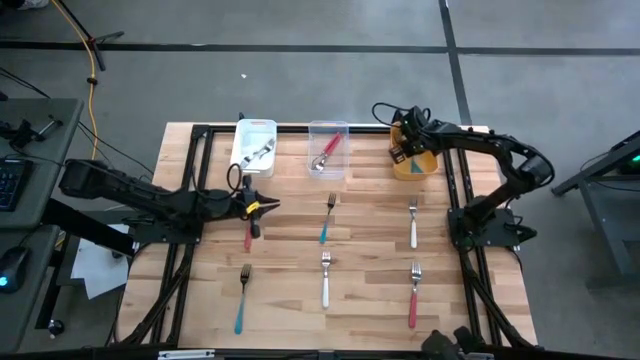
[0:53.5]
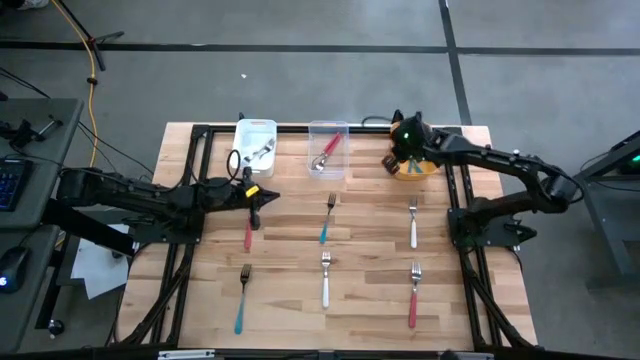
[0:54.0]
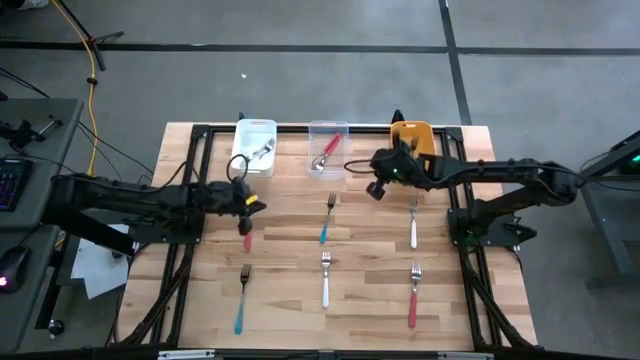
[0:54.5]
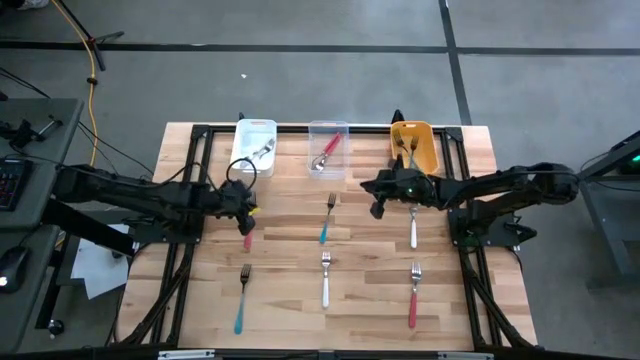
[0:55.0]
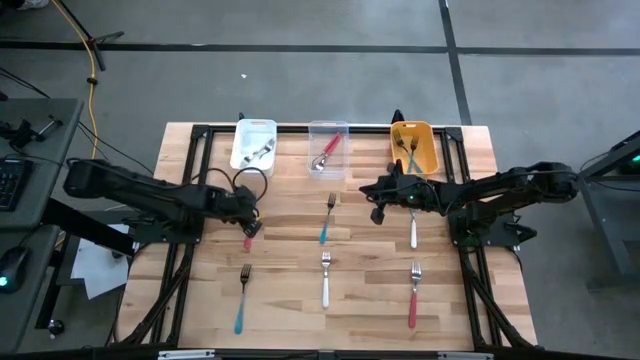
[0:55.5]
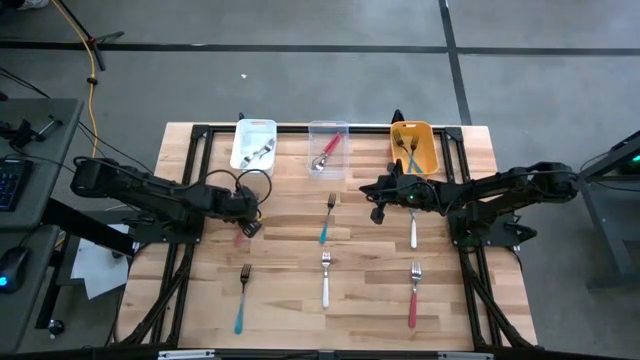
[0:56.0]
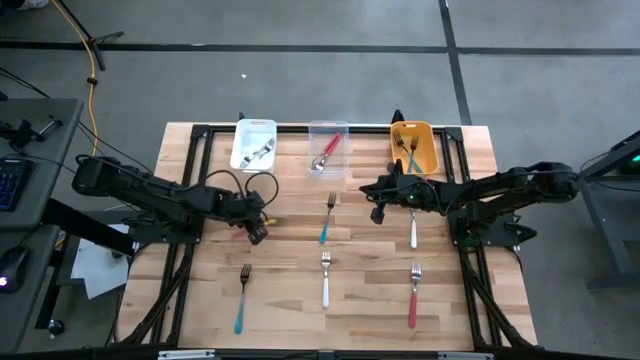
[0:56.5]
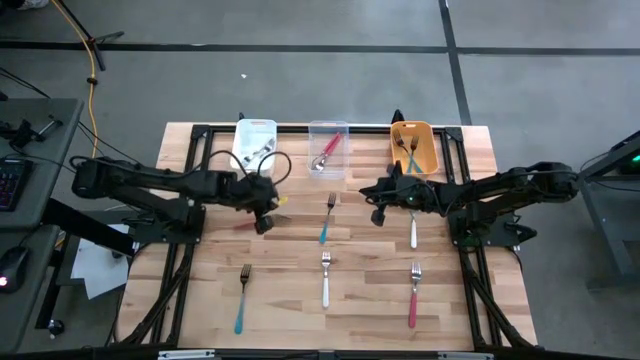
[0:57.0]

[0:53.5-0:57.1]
Task: Sort silverware by color (type)
Put the top pink fork into the transparent bin

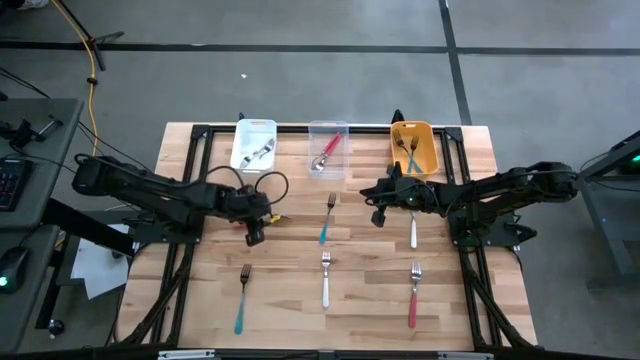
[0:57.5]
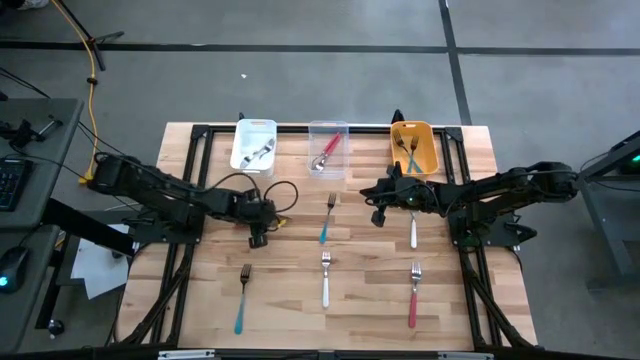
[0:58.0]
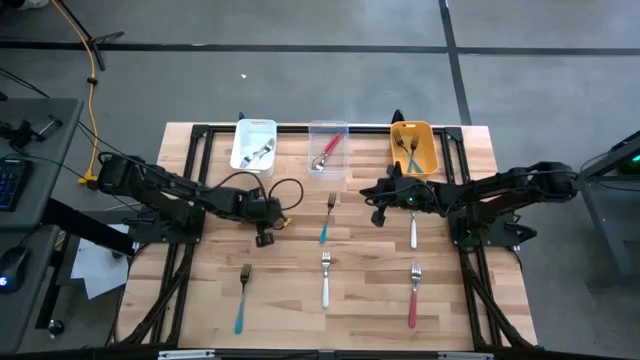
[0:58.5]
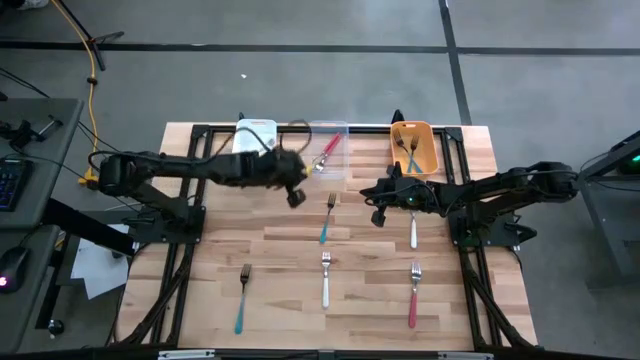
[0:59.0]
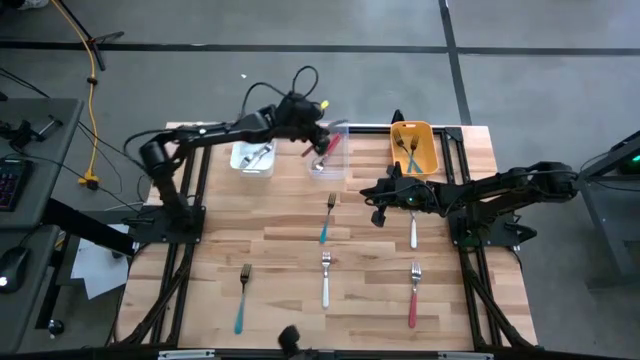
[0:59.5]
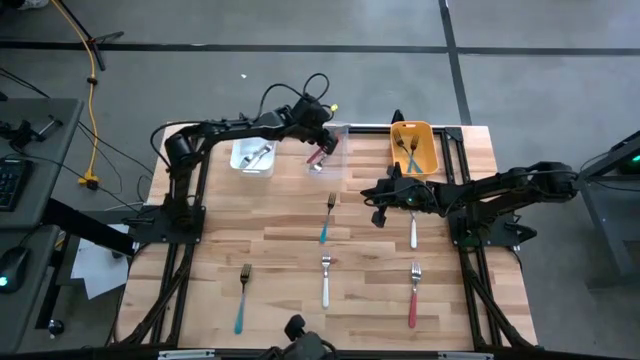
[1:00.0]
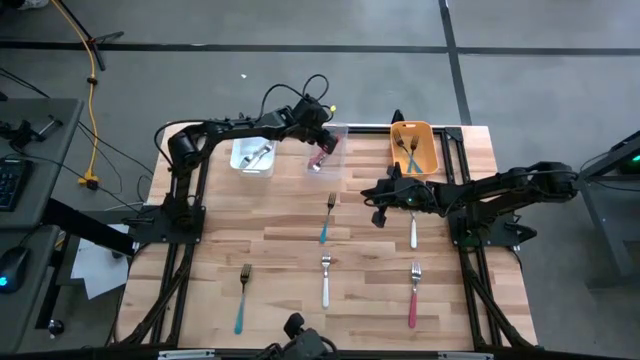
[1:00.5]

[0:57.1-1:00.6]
Put the top pink fork into the transparent bin

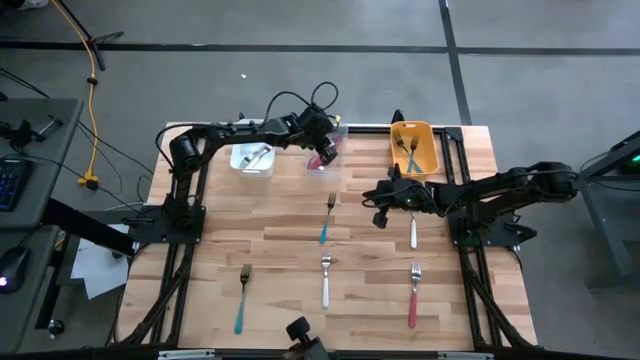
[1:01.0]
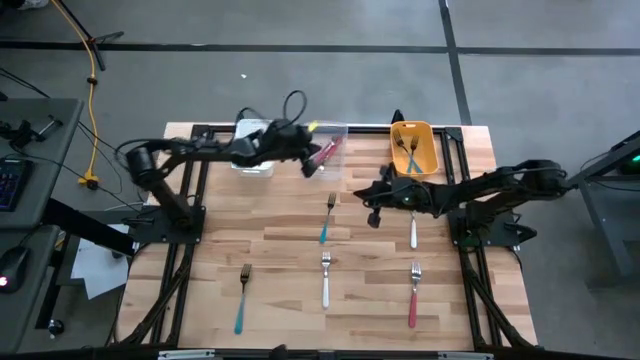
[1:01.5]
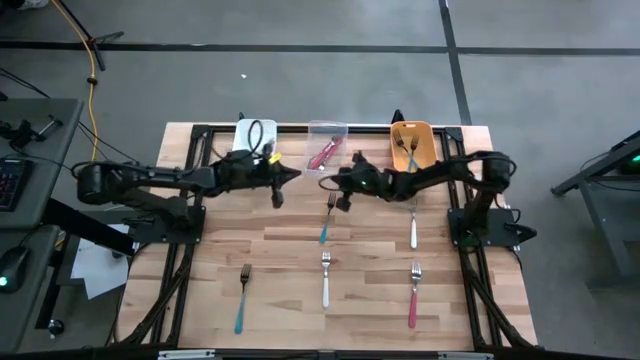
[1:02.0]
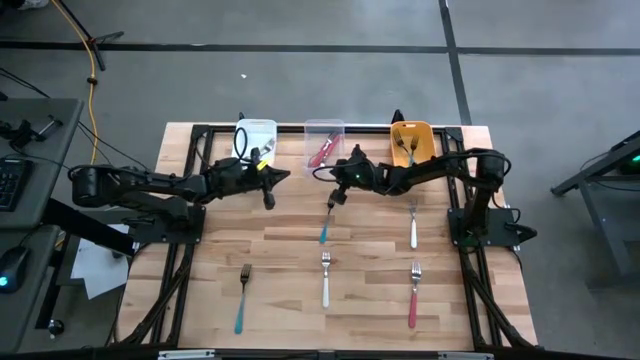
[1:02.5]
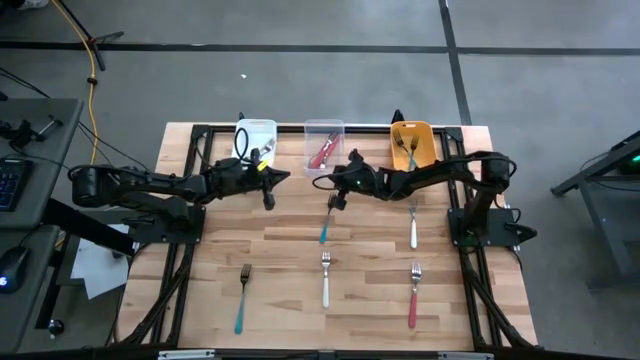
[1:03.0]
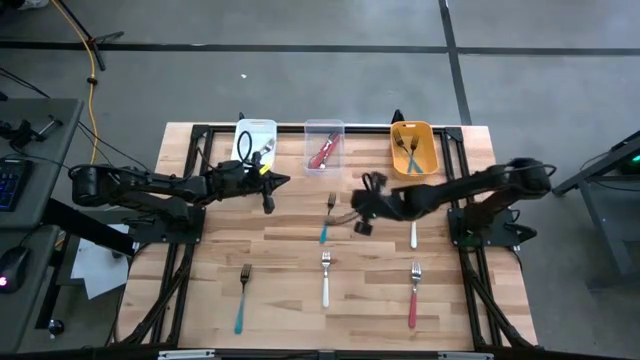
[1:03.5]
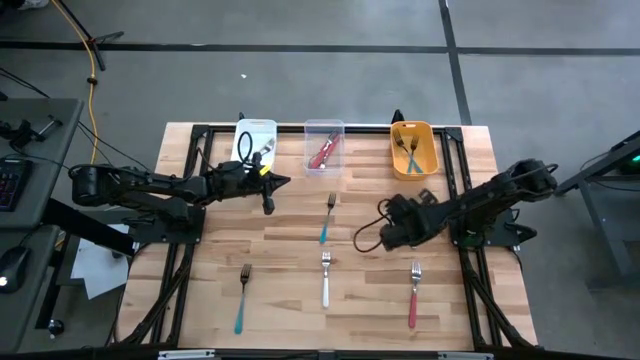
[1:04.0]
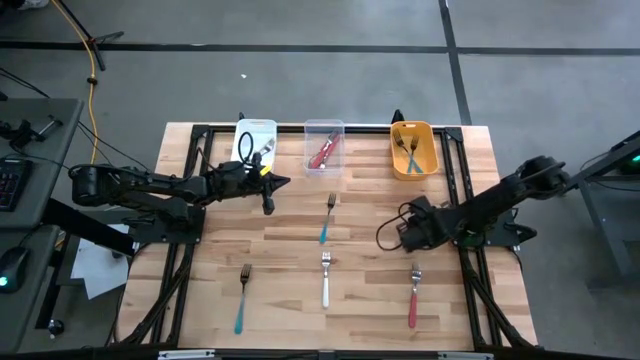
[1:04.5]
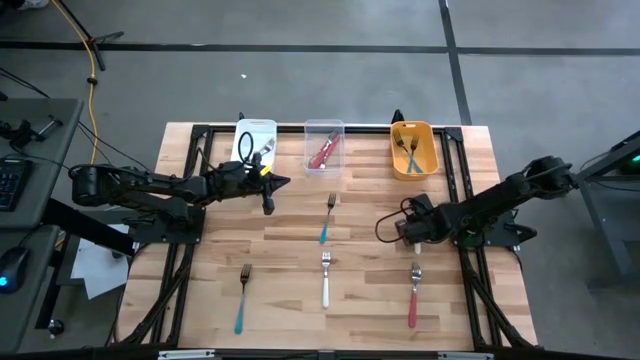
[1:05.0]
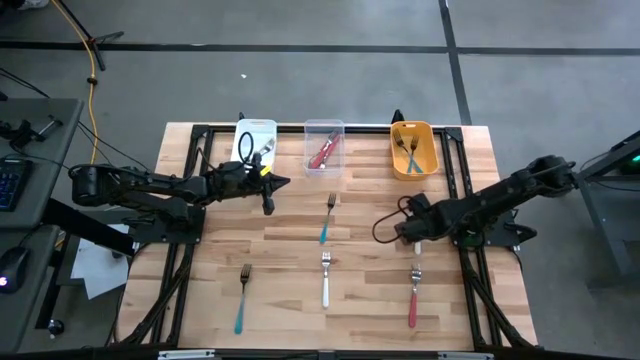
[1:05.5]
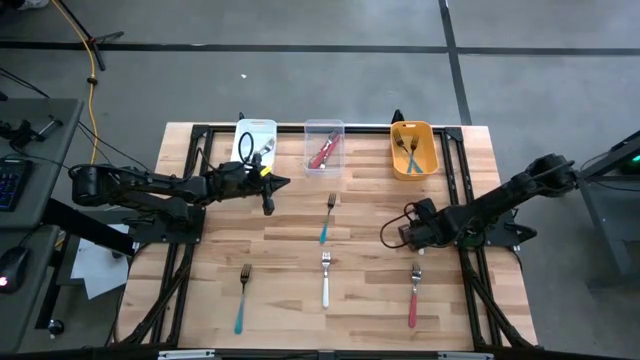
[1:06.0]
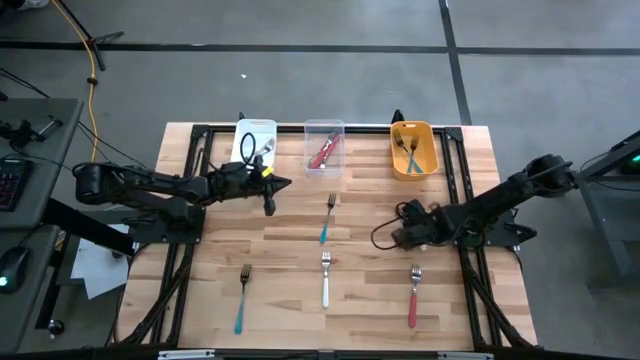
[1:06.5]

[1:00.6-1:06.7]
Put the top white fork into the white bin

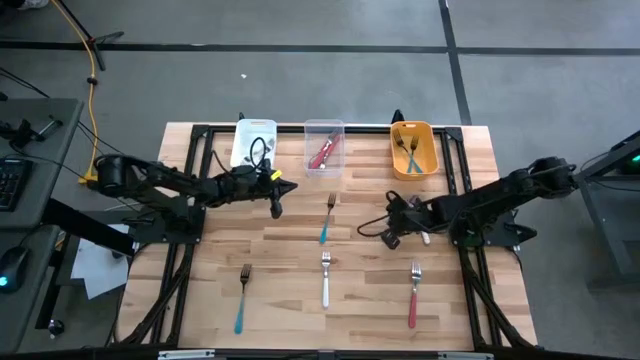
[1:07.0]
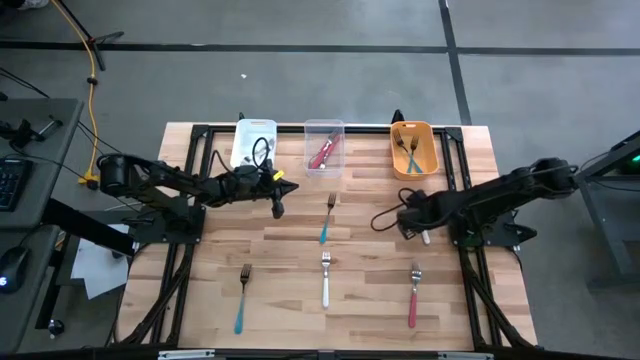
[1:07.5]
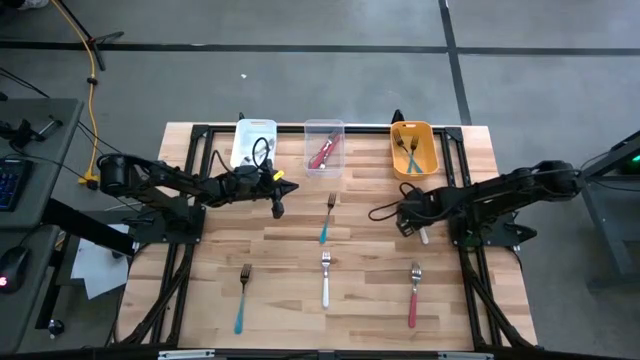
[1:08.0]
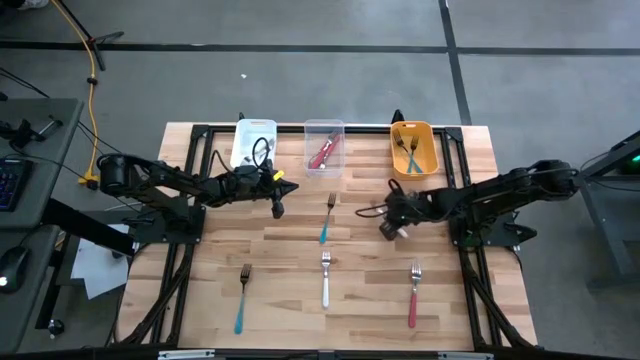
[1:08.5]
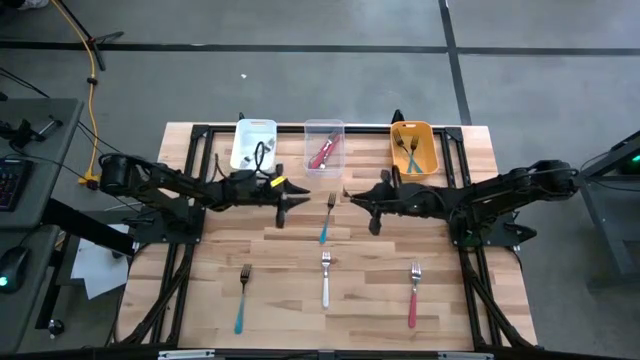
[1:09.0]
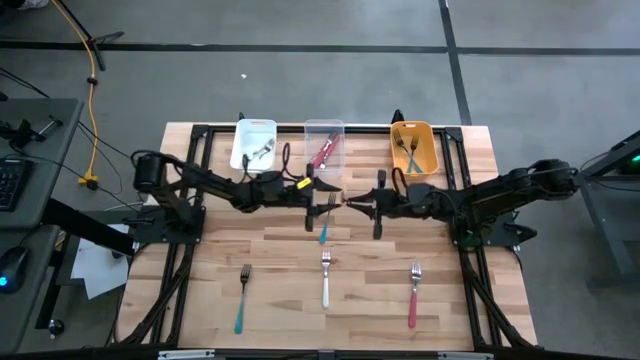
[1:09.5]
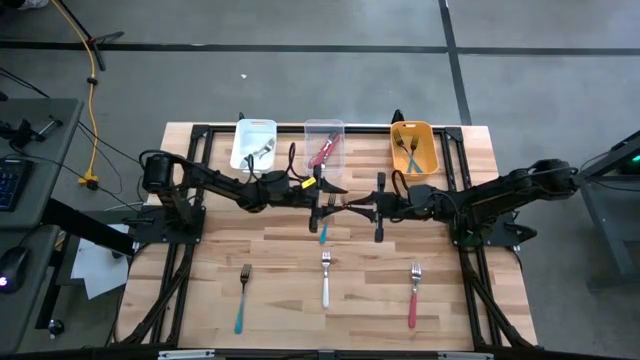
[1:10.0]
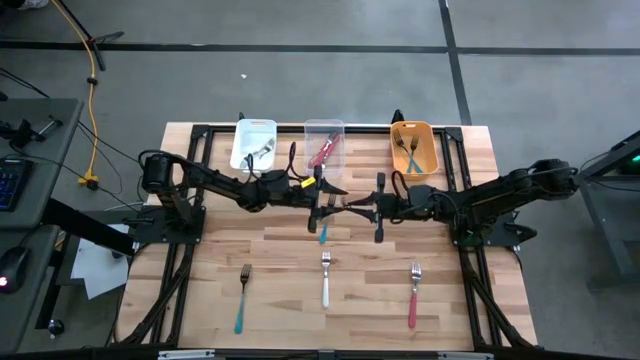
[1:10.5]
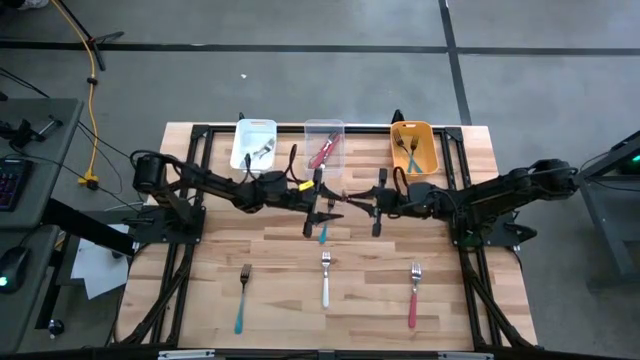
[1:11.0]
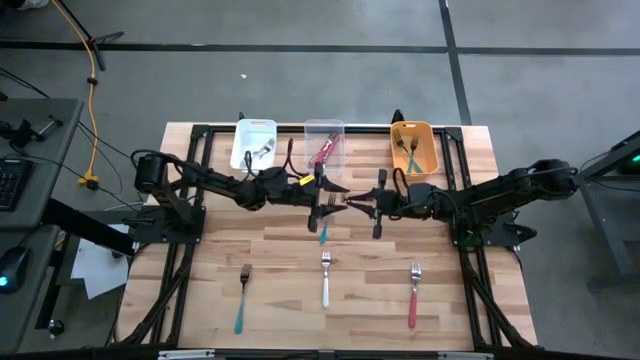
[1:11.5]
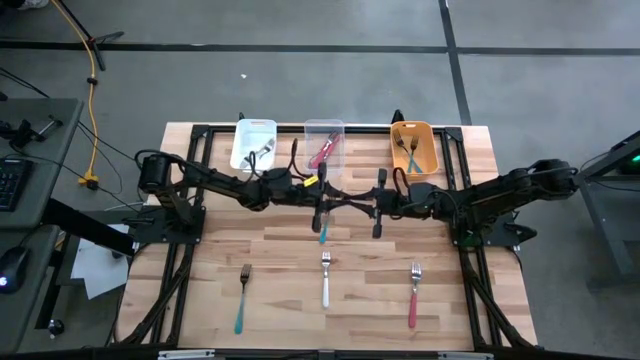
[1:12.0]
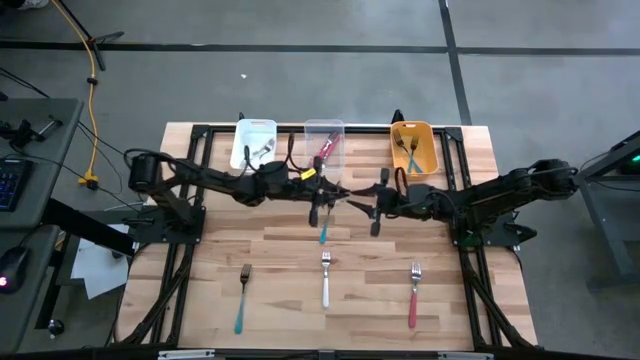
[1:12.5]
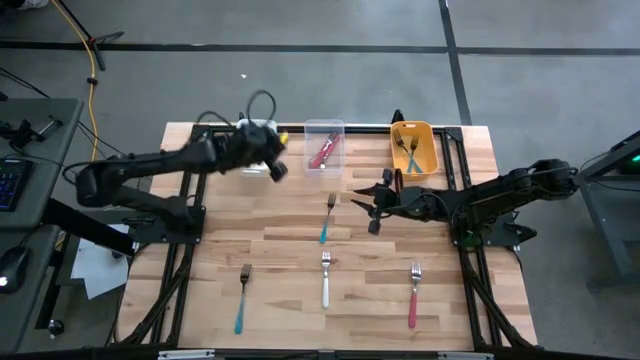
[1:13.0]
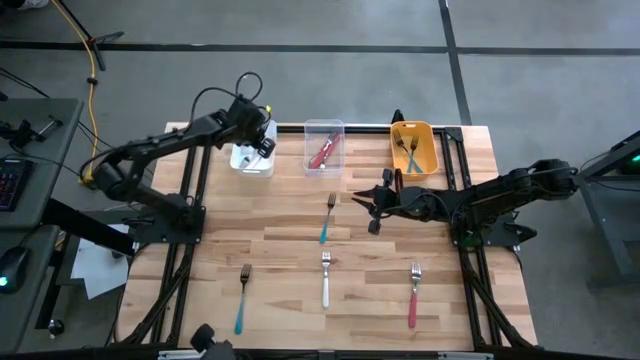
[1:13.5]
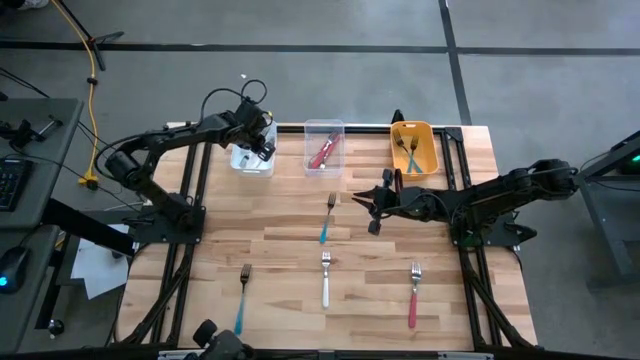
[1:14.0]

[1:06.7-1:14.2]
Put the top white fork into the white bin
